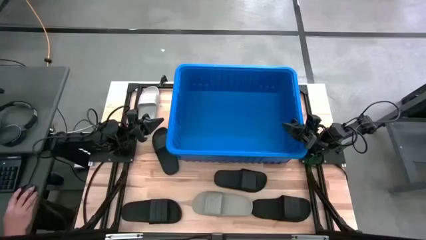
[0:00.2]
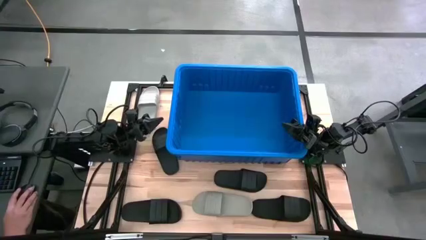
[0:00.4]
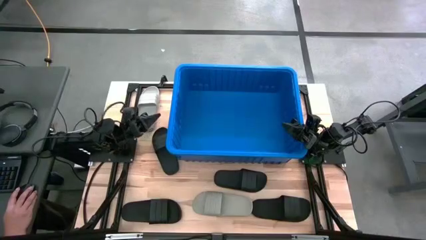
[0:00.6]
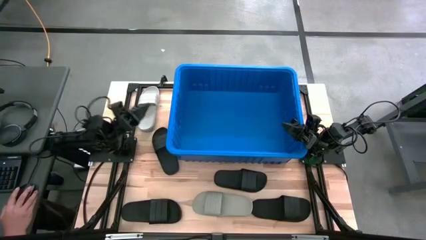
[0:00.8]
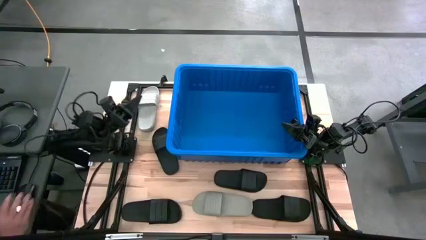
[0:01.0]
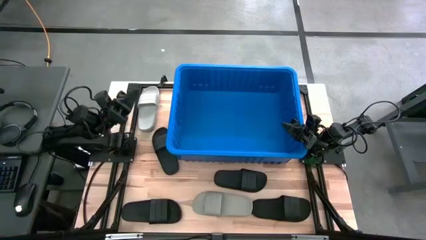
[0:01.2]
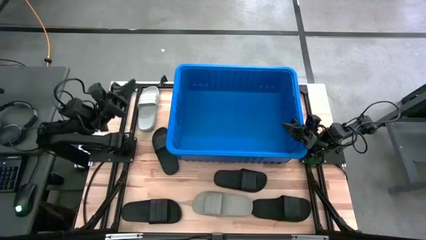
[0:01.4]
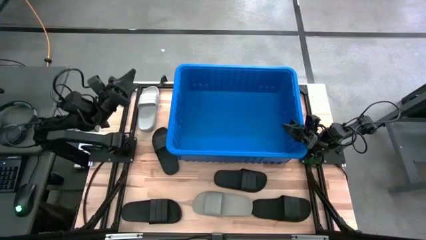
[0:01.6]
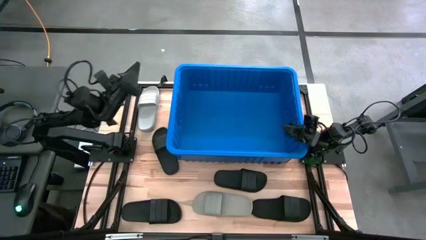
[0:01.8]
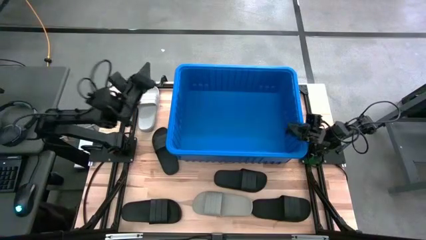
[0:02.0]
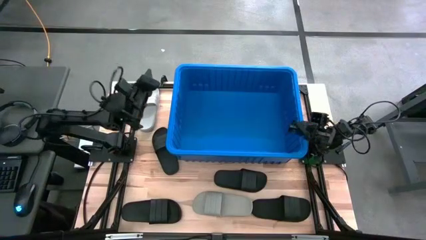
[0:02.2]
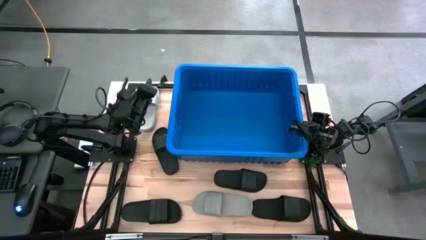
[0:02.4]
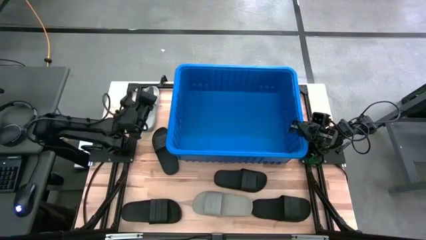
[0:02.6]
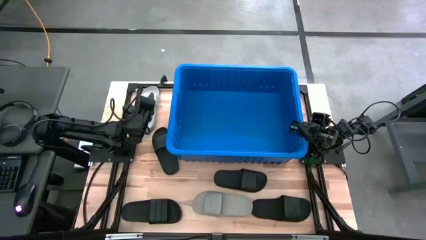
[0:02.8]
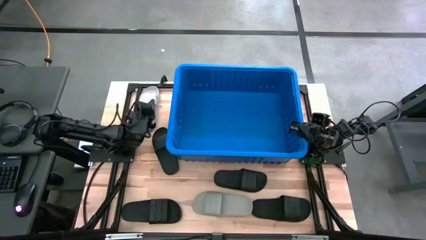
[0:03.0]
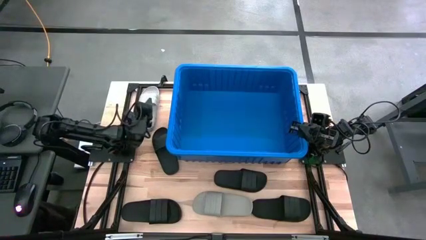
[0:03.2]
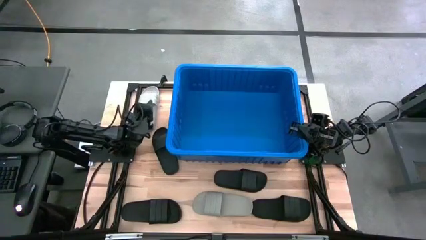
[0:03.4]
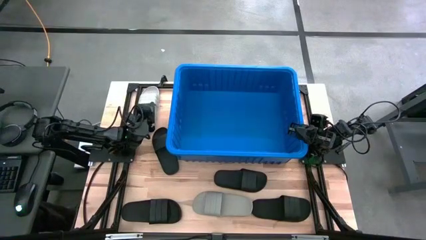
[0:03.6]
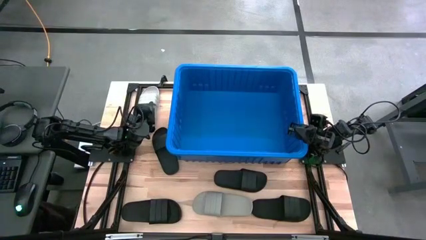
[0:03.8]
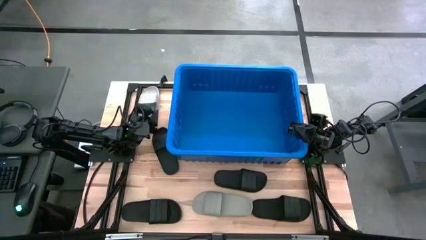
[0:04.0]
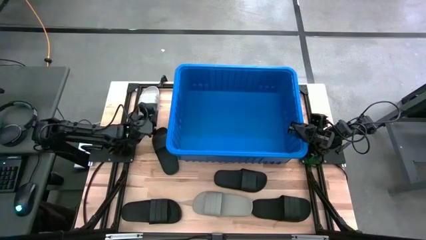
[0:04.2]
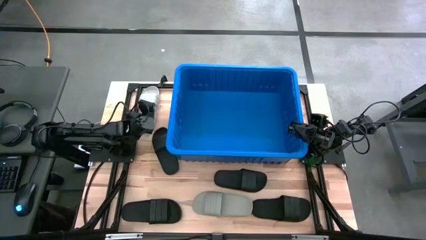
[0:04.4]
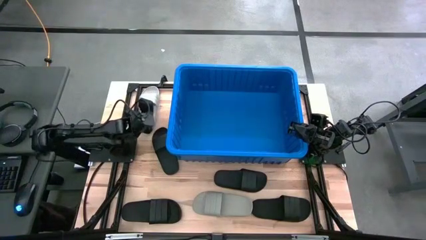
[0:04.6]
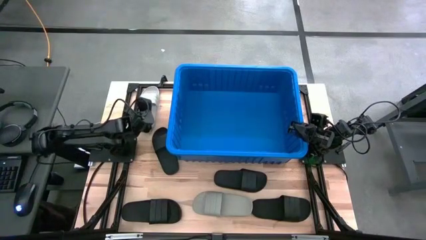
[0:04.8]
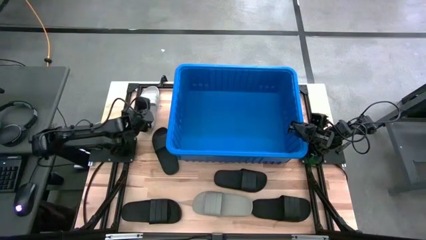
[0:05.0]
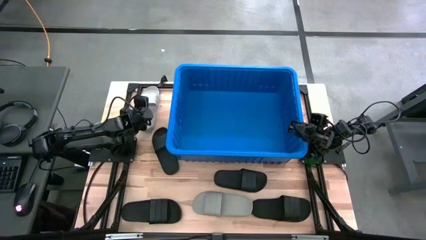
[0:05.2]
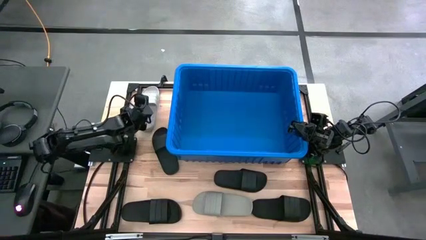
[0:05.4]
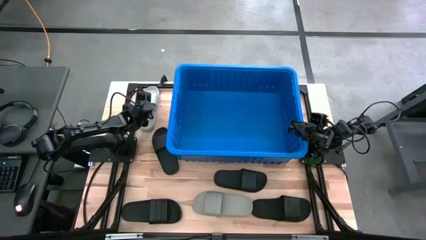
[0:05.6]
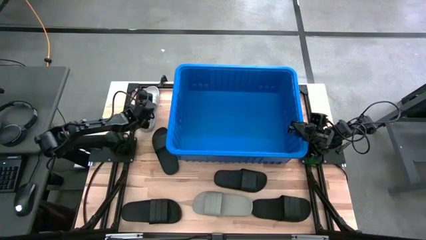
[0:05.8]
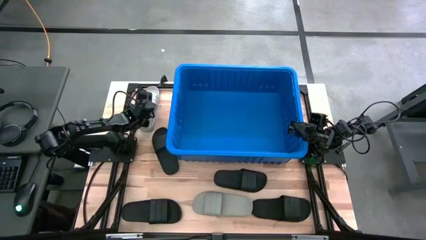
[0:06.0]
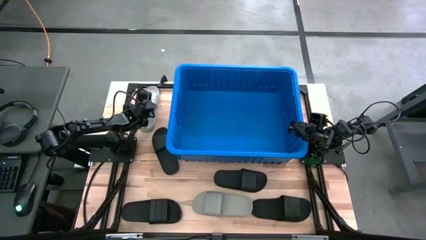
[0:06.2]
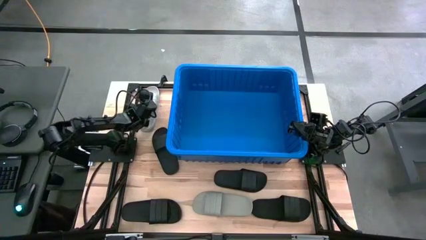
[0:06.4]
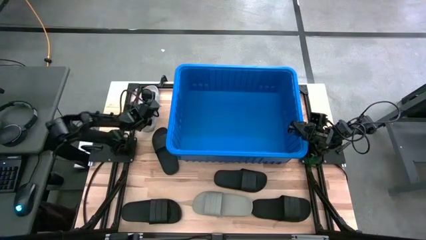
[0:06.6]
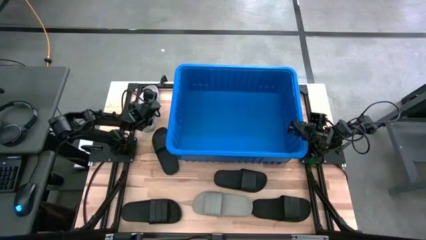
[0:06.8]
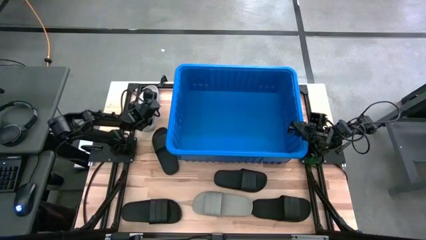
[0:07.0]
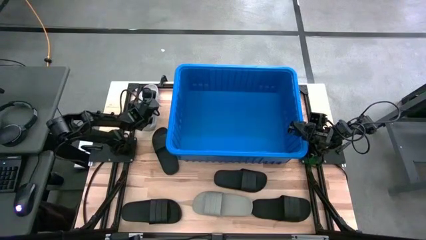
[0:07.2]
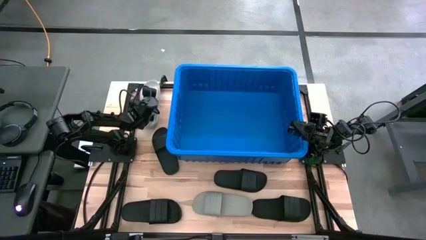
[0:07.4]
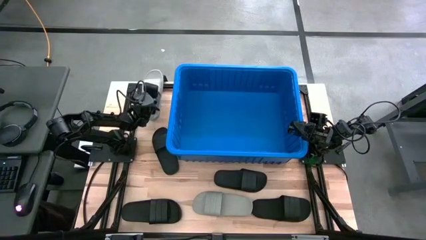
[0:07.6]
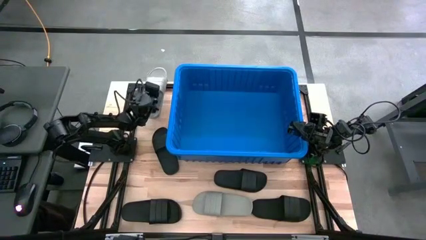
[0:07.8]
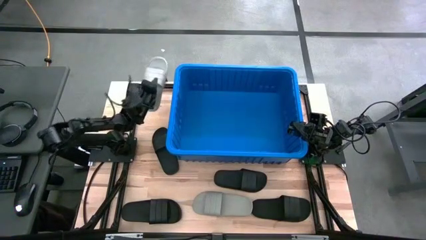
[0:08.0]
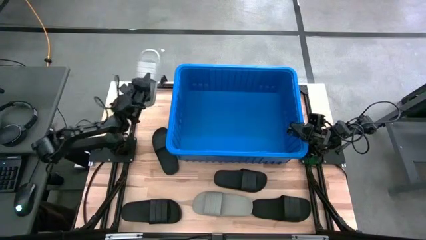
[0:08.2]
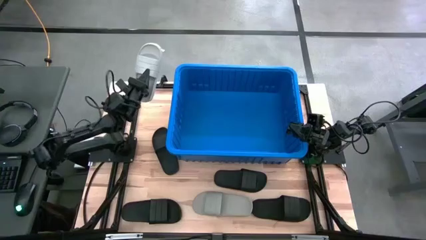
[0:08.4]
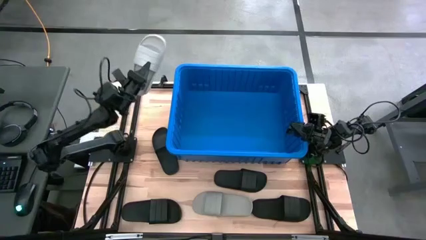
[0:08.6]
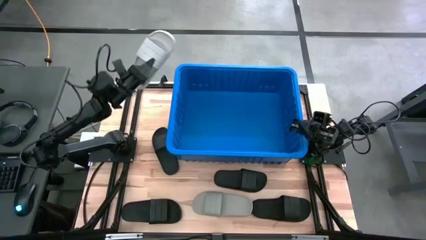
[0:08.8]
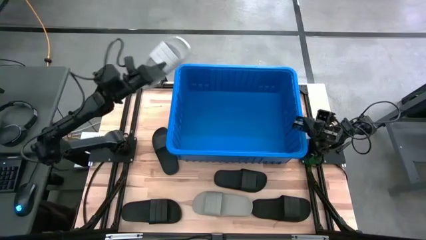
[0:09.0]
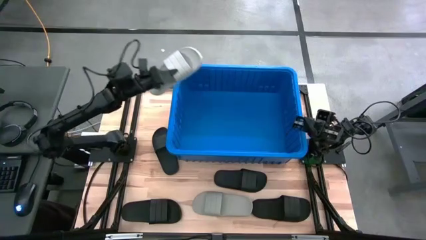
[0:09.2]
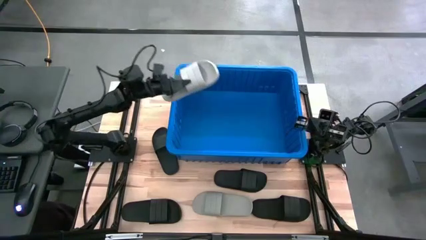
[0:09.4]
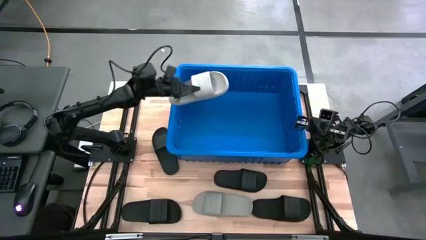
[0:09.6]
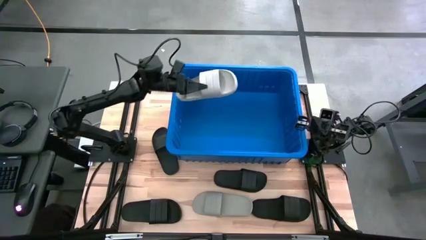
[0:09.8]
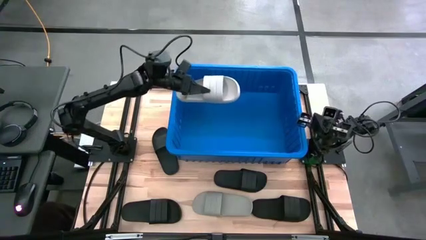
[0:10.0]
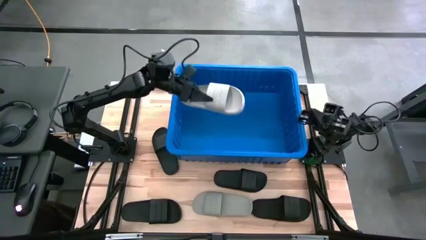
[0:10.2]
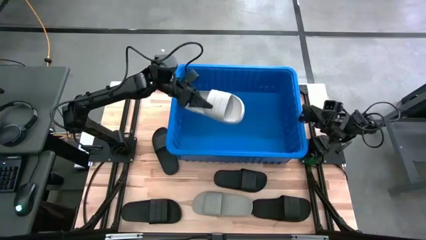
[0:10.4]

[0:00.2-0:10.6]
Task: Pick and place slides into bin
Put the gray slide into the blue bin
